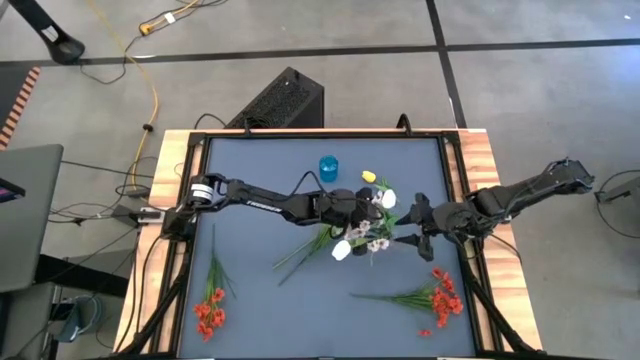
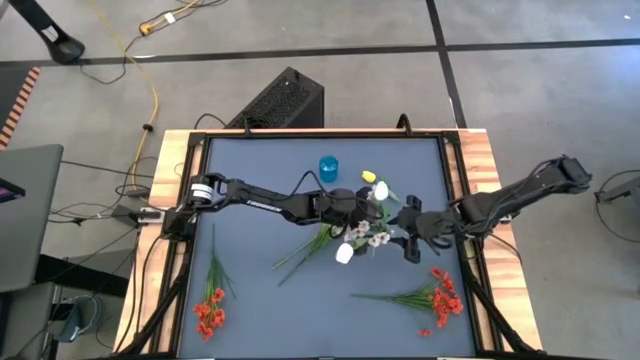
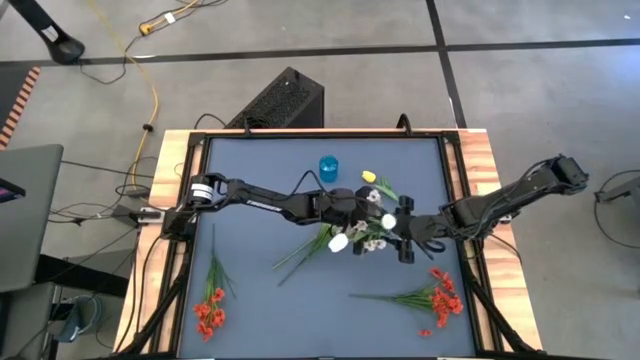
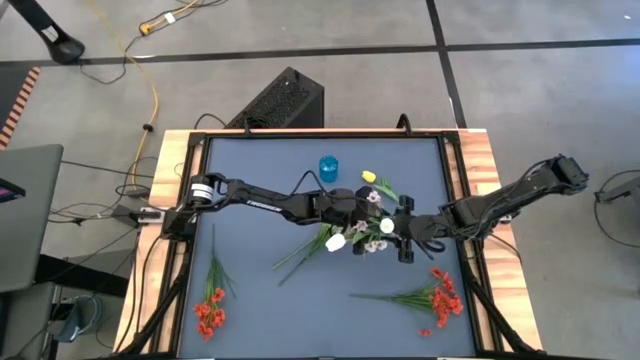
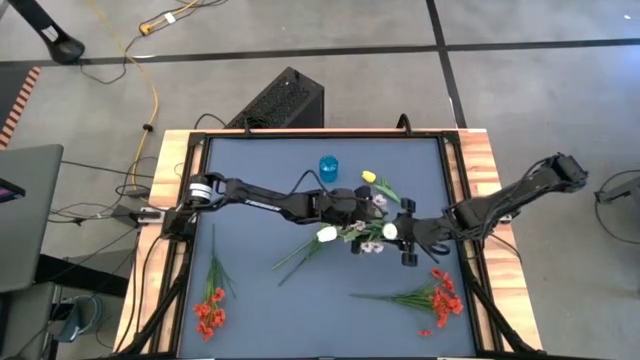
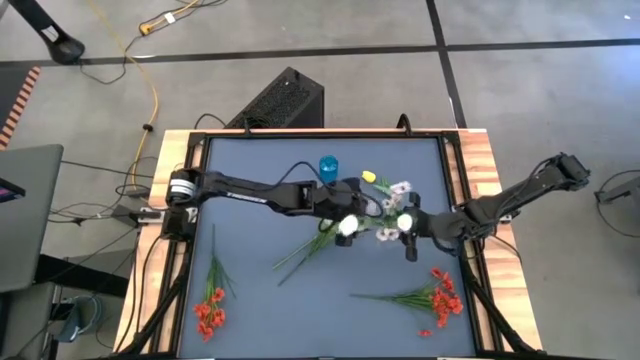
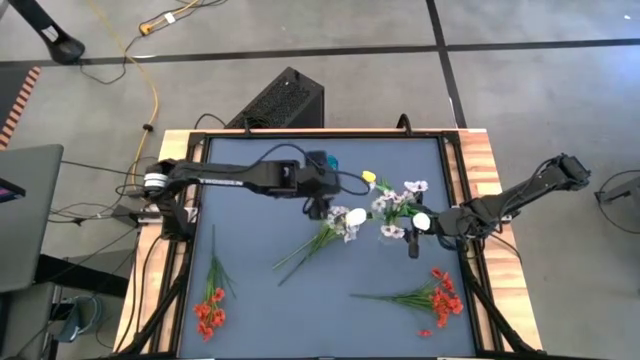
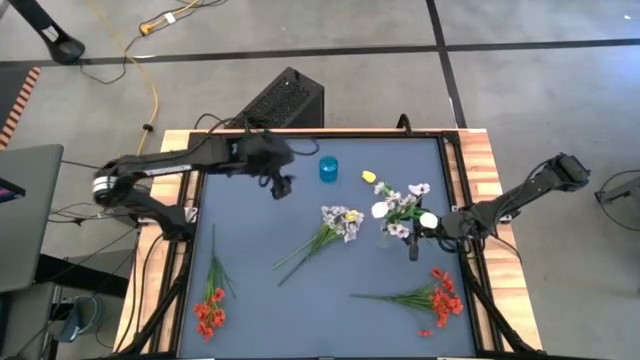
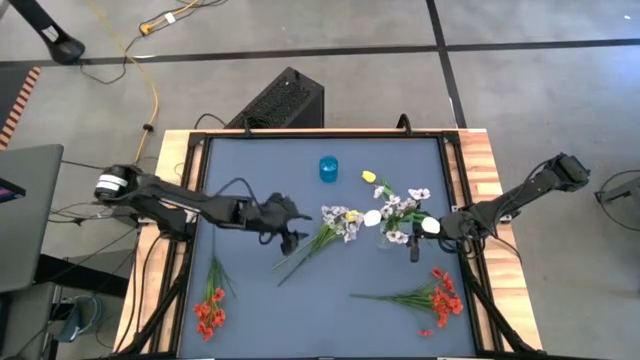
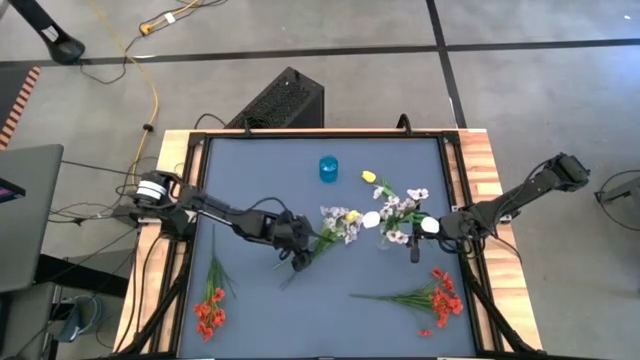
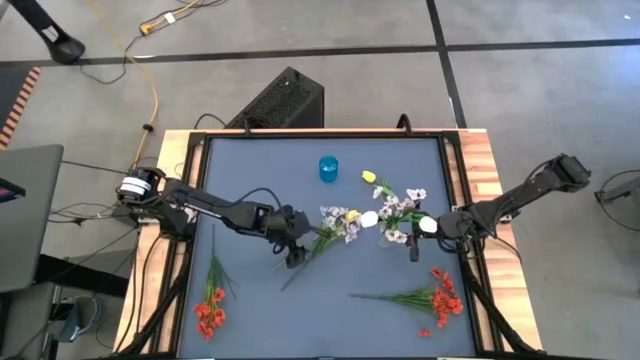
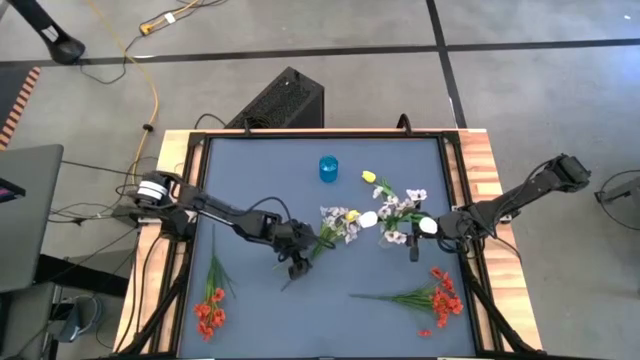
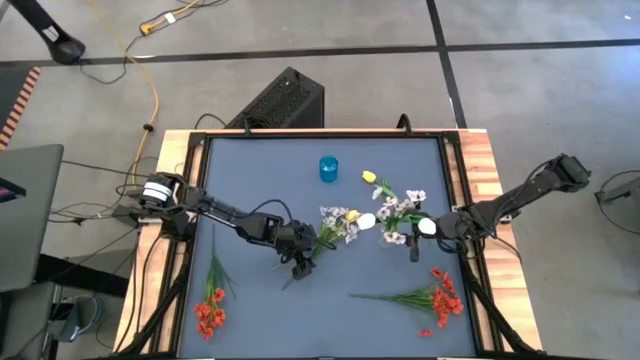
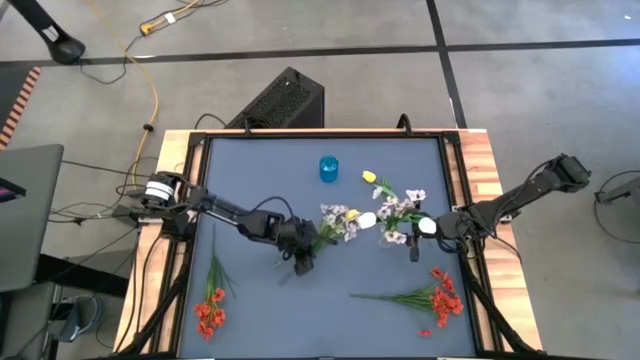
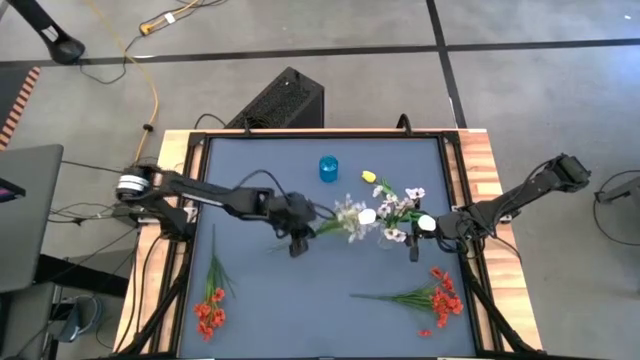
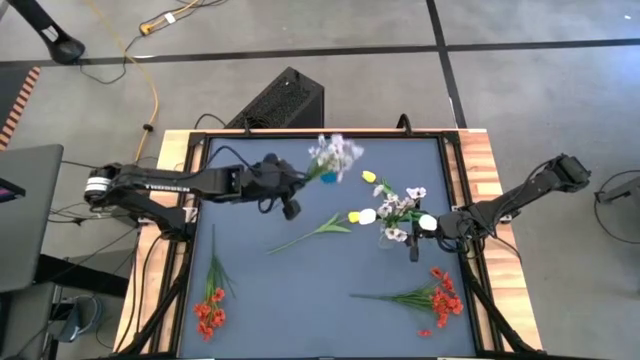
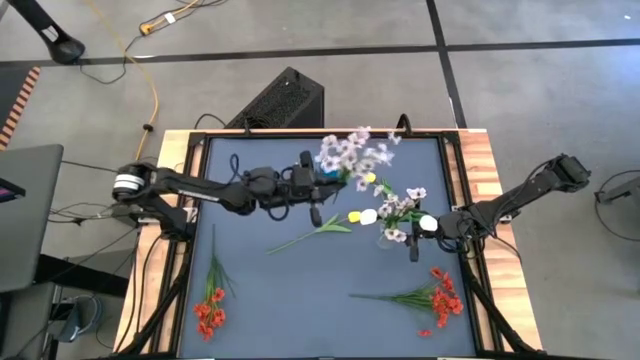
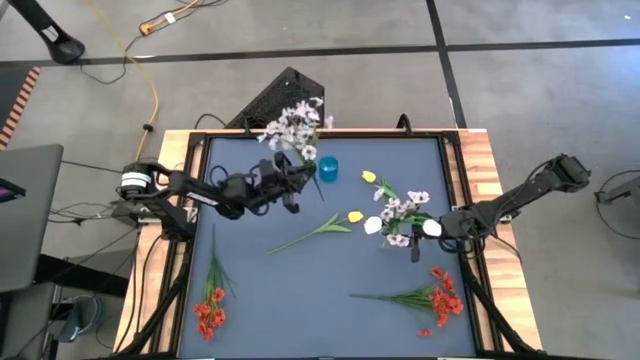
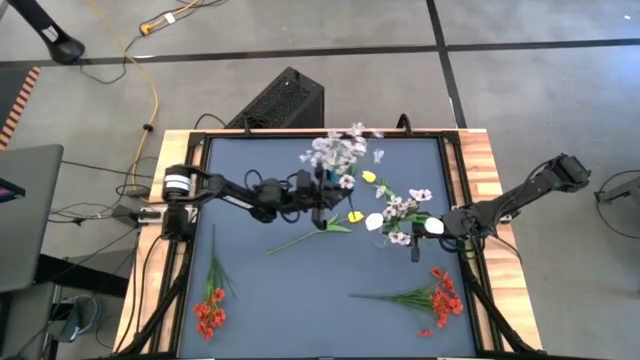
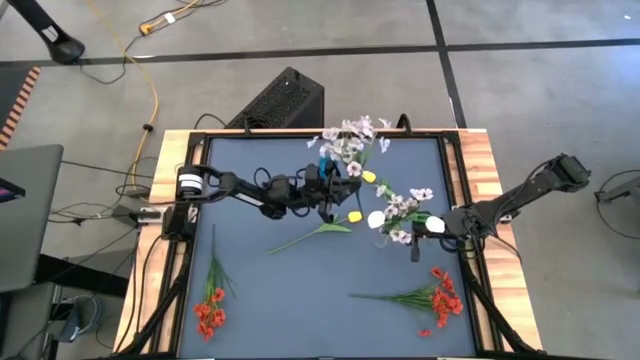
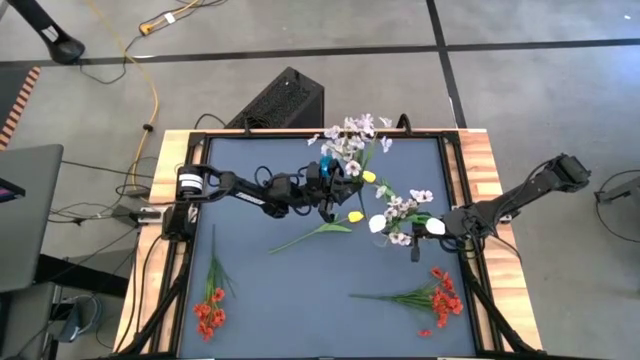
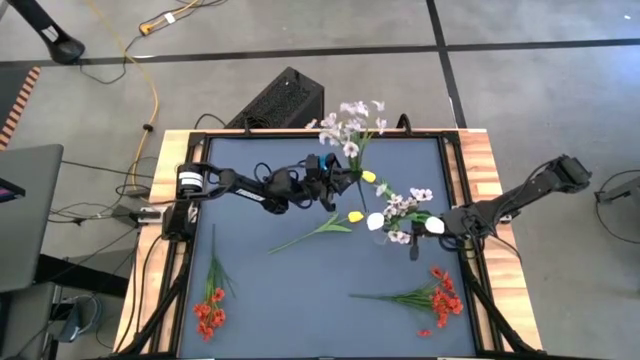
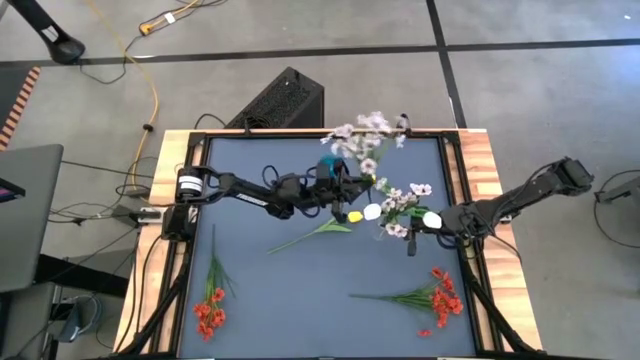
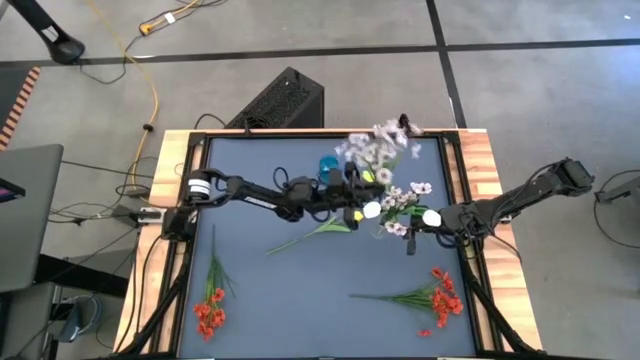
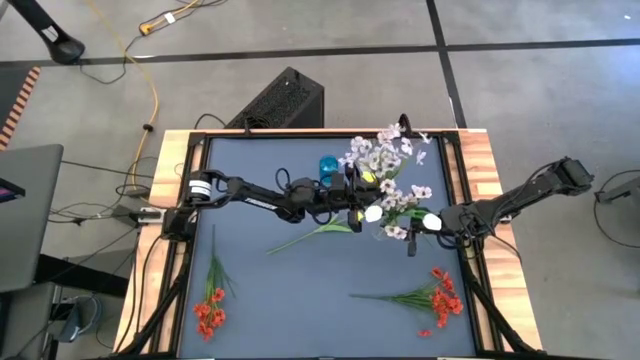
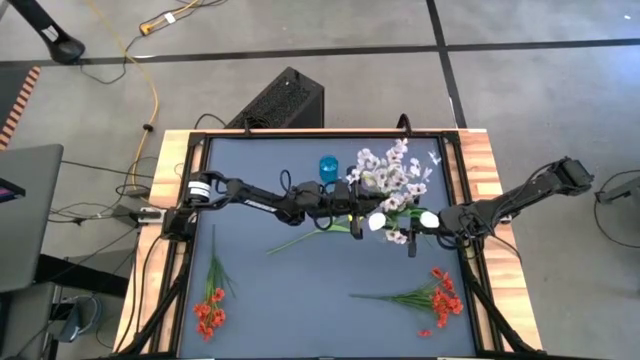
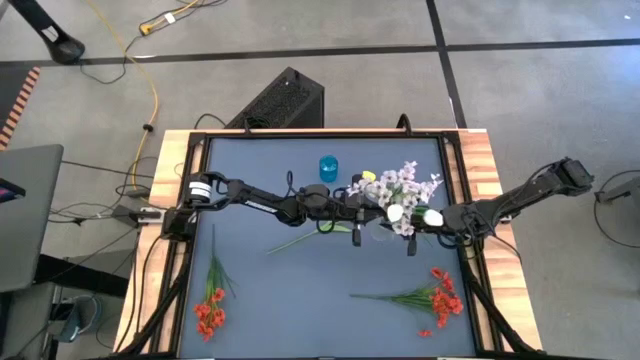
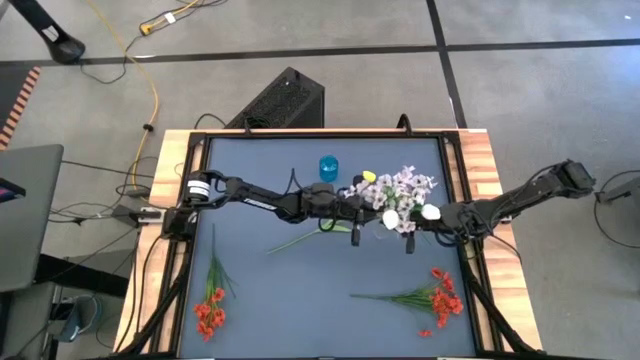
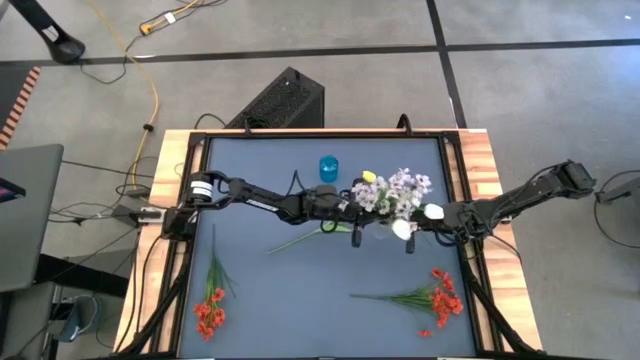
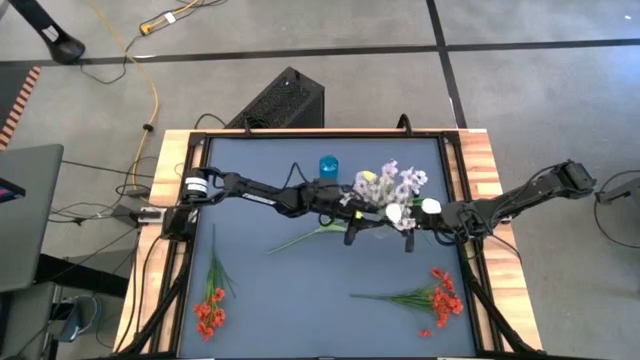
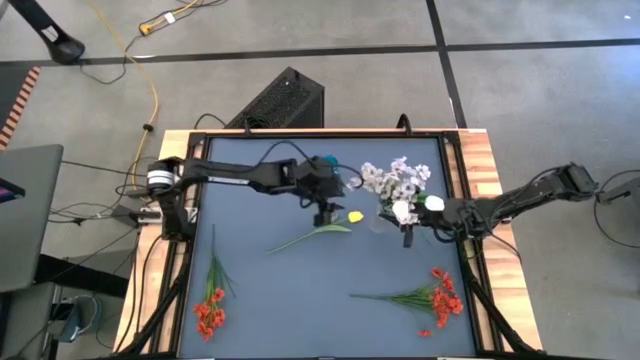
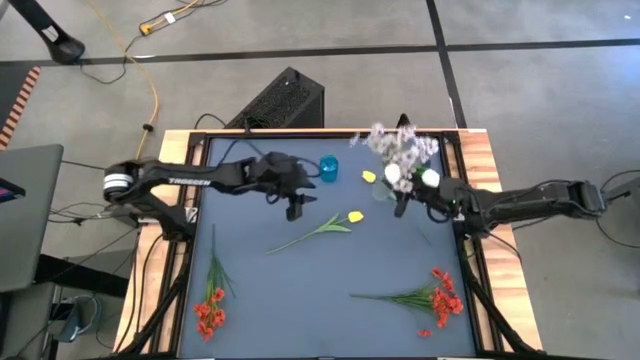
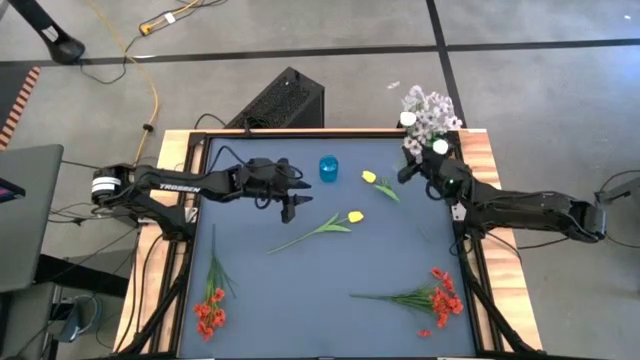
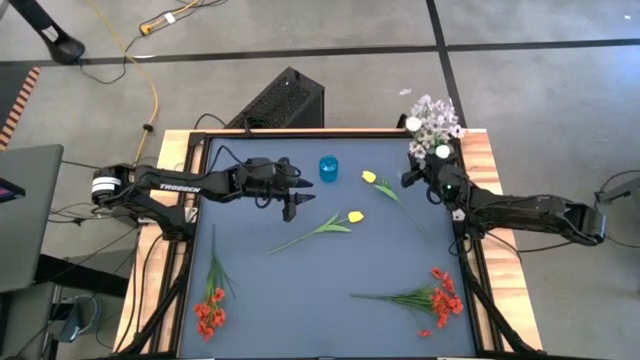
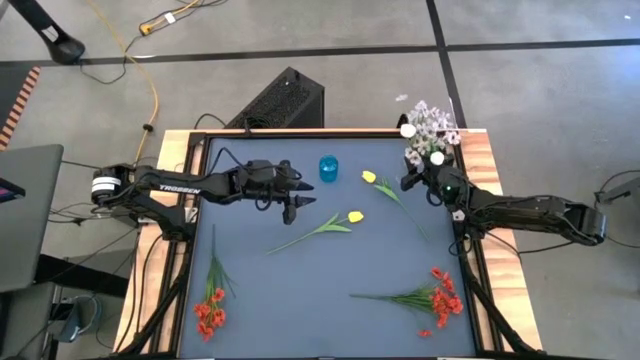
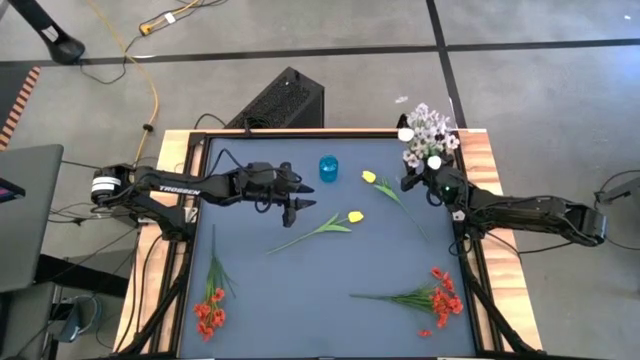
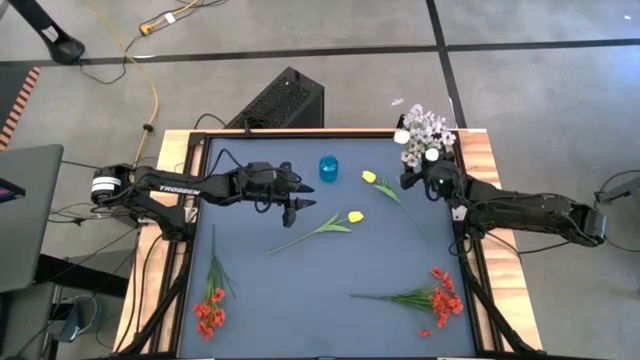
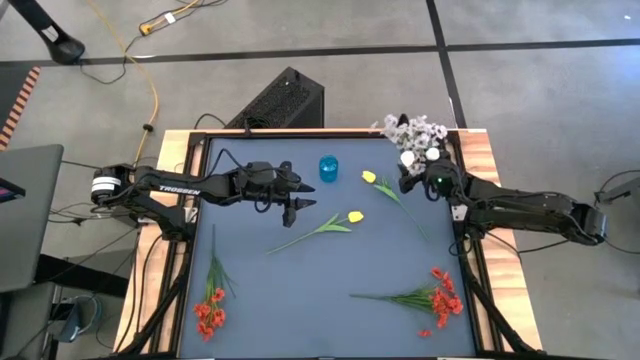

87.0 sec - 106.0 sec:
Task: Sort flowers into vase by color
Put the white flowers into the transparent vase
